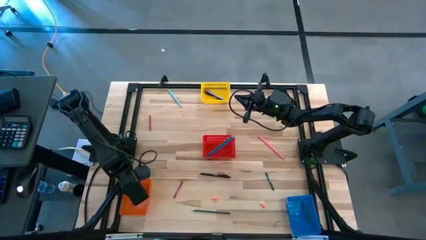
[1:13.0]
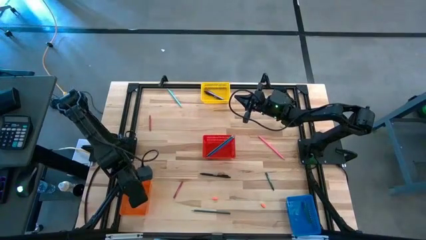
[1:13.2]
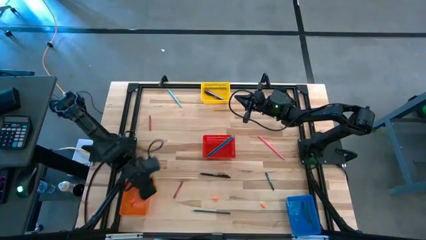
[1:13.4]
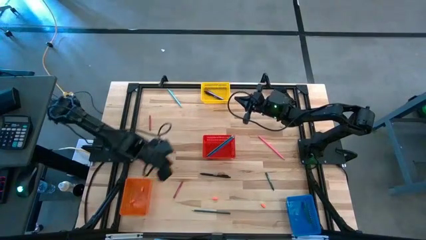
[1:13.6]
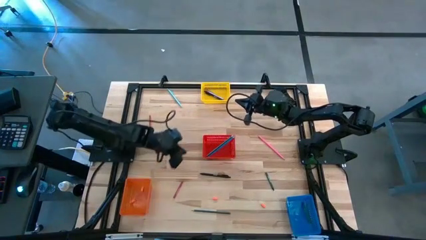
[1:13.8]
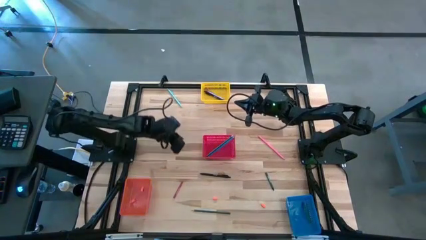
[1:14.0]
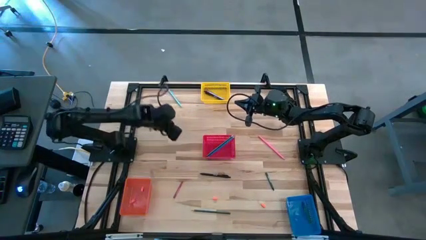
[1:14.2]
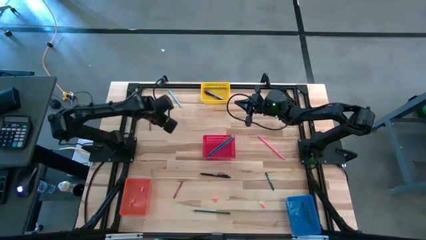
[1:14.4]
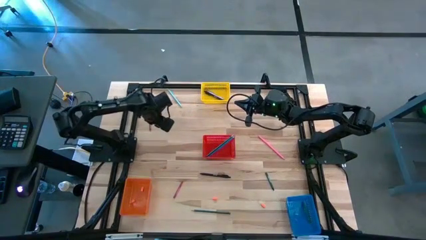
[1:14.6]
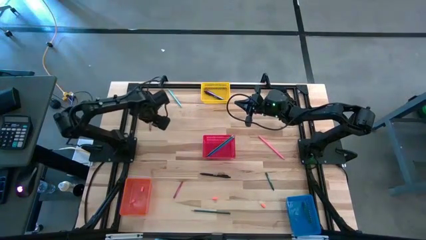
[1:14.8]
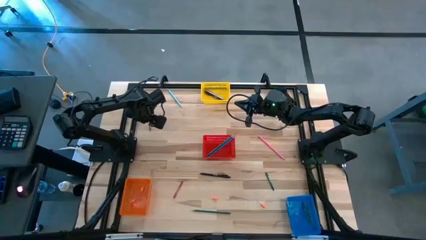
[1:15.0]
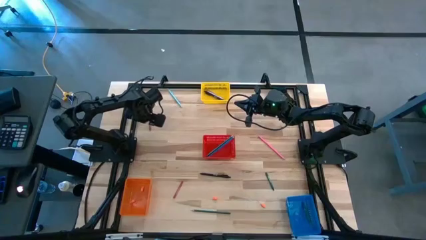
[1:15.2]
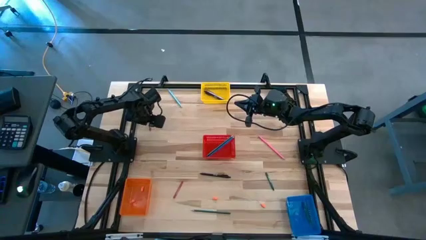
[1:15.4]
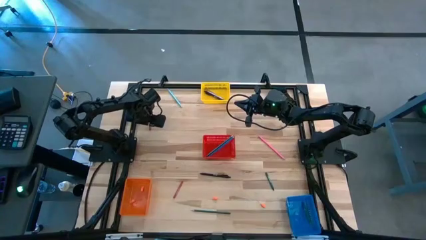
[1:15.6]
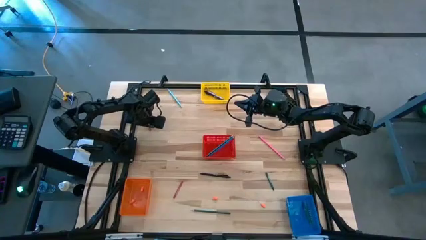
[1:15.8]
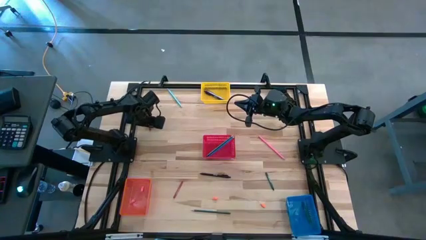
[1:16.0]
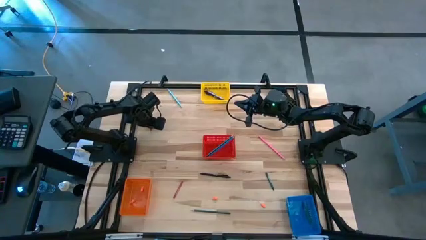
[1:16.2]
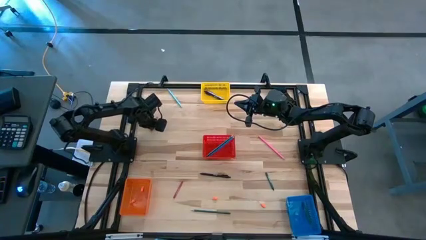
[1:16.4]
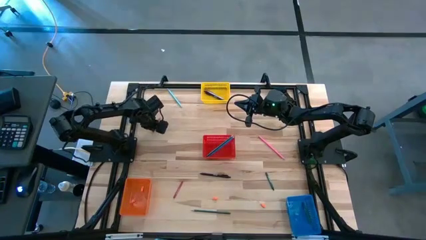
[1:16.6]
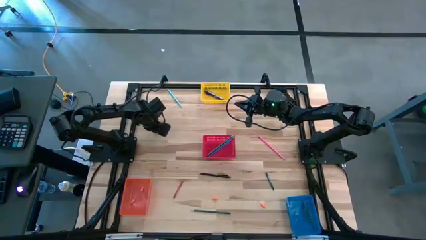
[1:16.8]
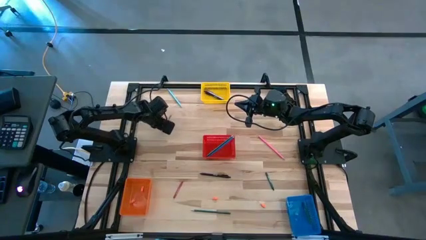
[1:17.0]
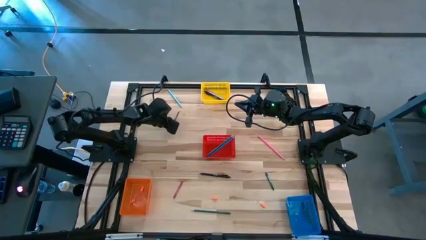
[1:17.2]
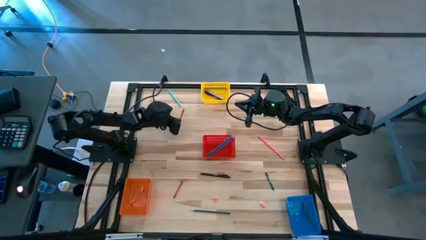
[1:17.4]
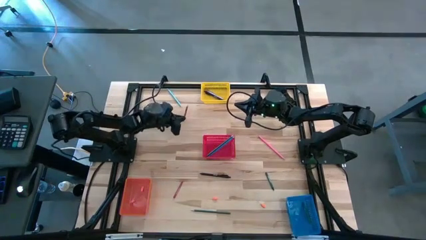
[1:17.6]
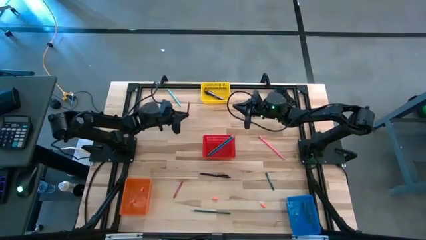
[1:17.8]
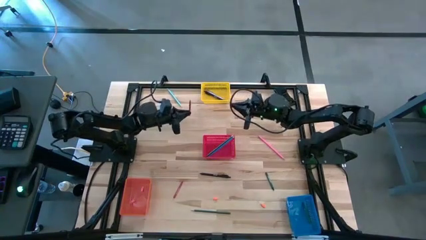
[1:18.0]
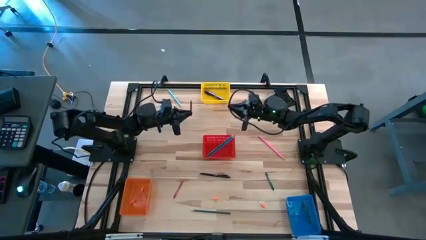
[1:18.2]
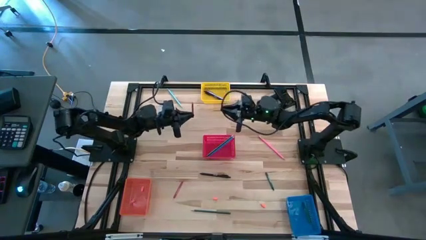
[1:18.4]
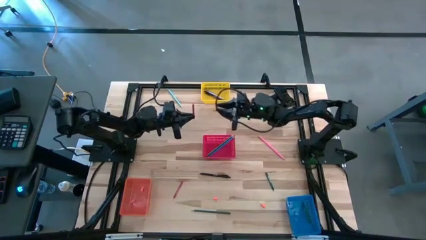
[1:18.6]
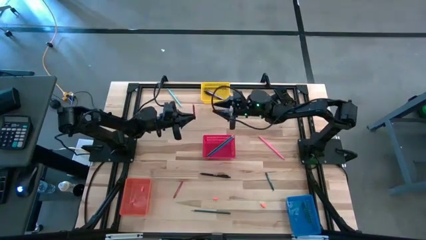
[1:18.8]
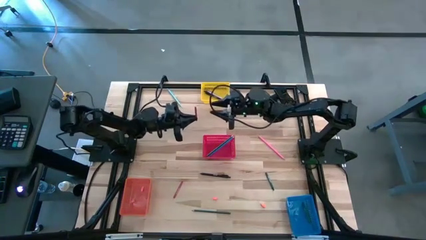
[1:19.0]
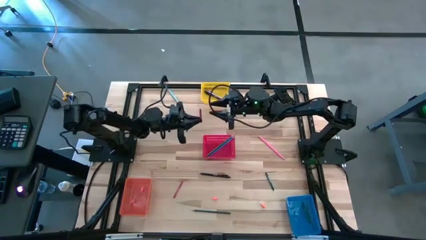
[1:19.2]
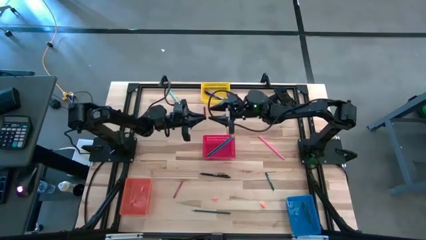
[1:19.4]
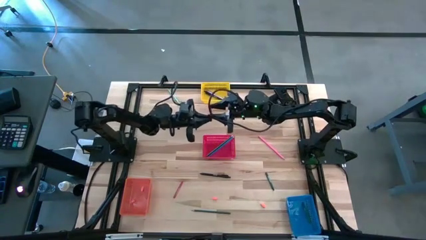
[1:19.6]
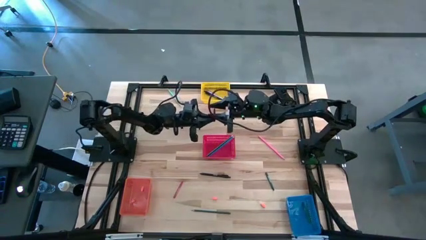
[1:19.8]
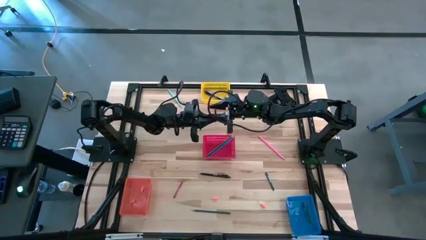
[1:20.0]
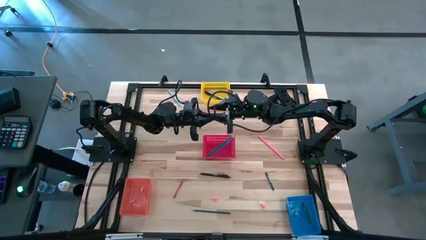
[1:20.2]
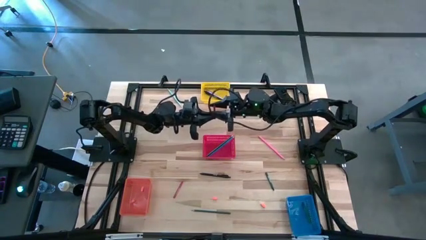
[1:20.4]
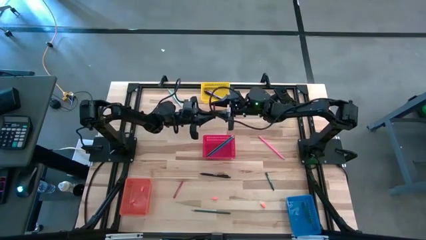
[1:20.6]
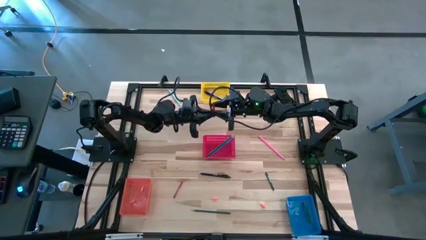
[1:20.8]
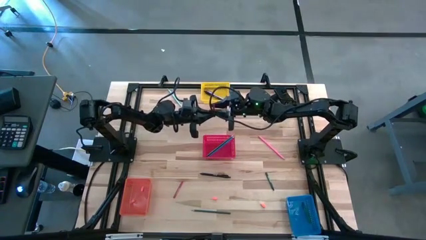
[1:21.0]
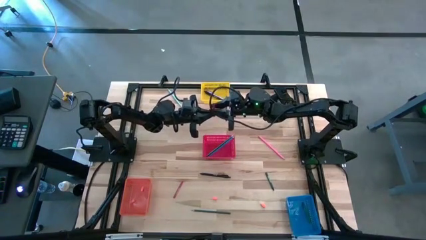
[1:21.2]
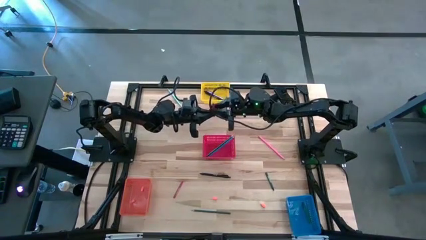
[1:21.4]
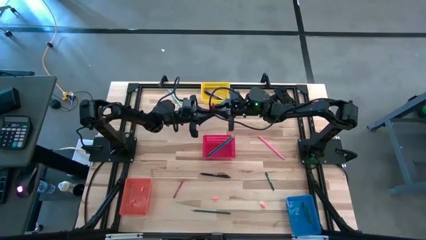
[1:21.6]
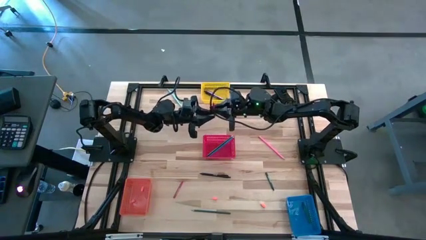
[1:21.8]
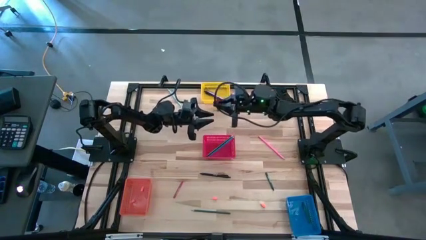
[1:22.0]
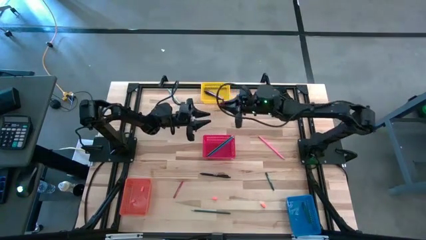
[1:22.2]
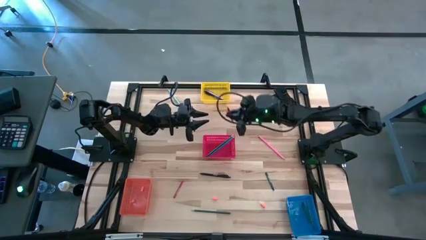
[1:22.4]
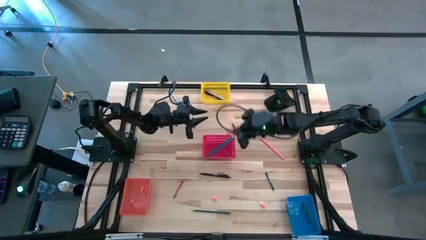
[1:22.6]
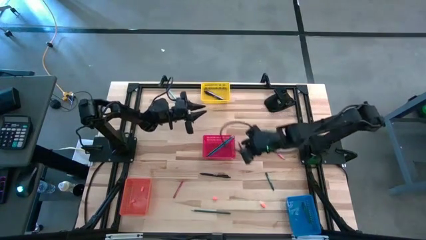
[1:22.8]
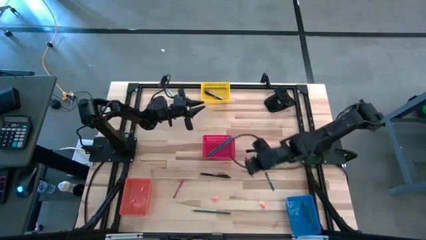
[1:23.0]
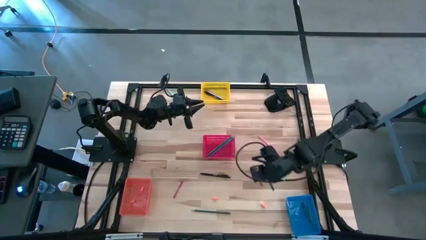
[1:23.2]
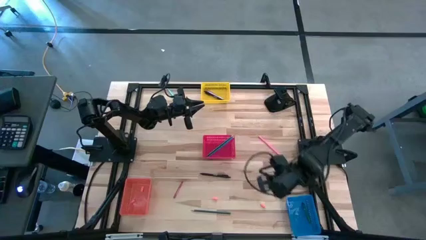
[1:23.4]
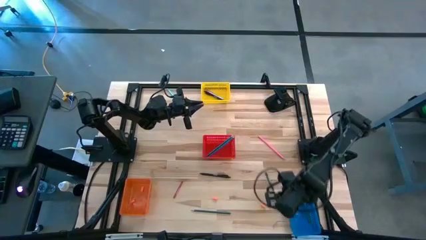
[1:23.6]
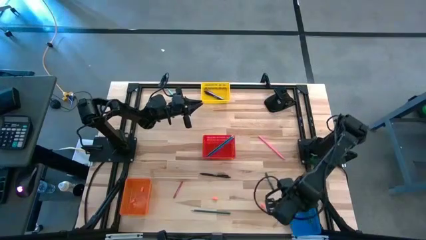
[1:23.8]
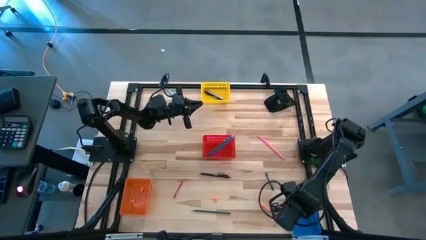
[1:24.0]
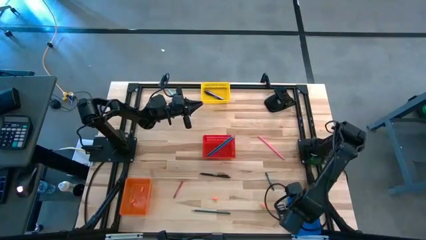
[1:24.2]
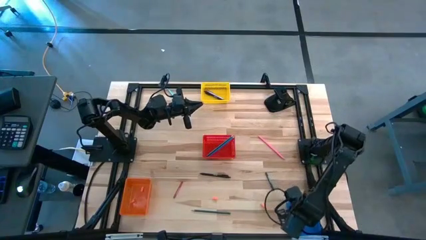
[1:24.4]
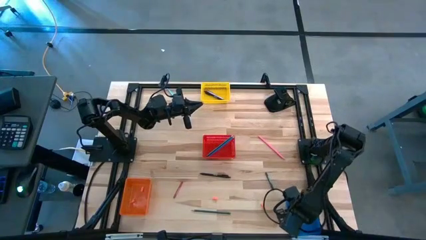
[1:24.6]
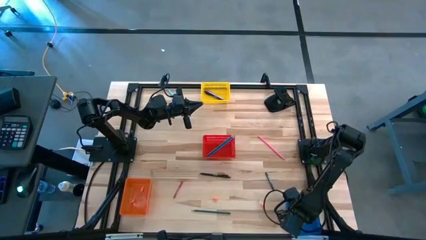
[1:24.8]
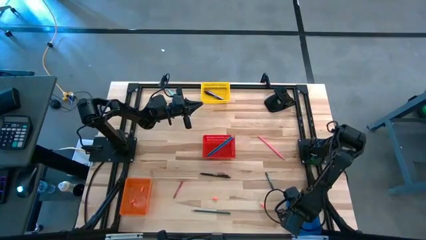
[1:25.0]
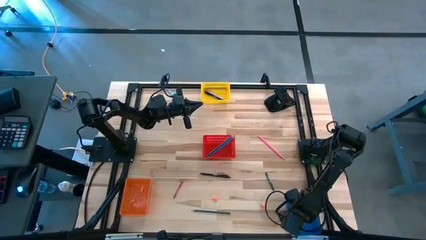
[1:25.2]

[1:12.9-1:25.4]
Task: Sort crayons/erasers/pens/pencils in bins
Put the red crayon into the blue bin

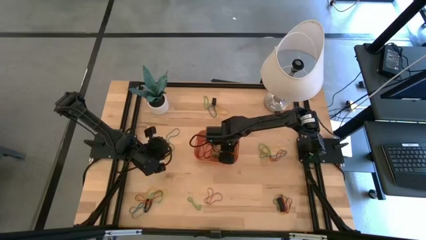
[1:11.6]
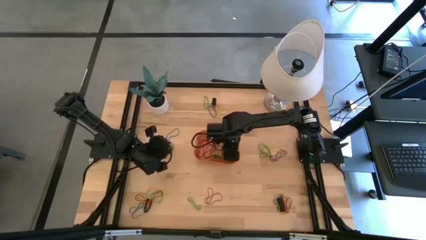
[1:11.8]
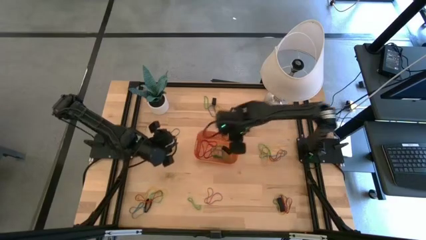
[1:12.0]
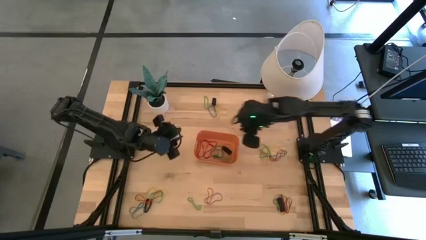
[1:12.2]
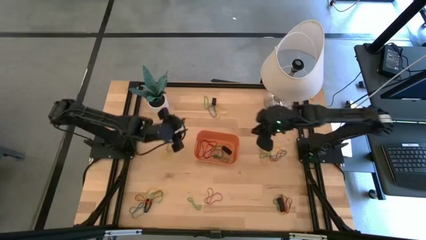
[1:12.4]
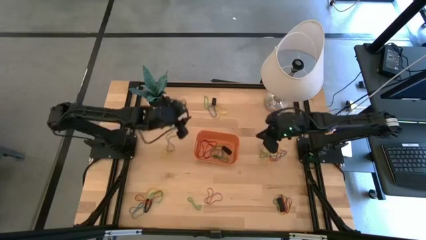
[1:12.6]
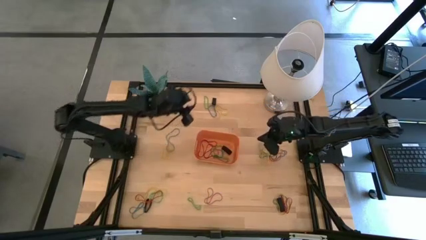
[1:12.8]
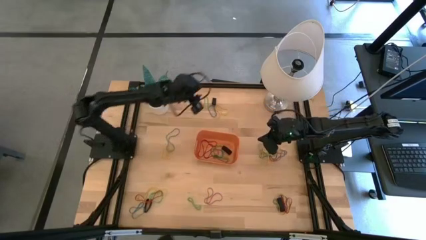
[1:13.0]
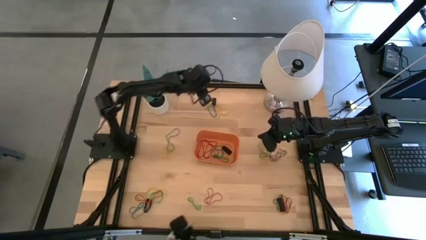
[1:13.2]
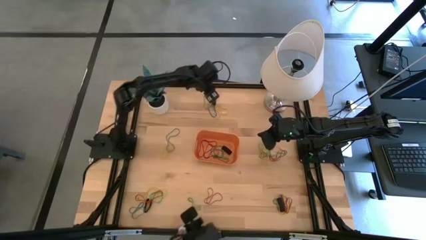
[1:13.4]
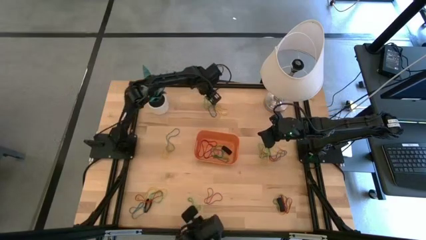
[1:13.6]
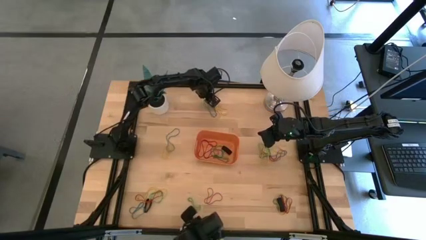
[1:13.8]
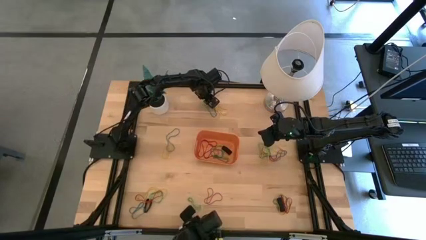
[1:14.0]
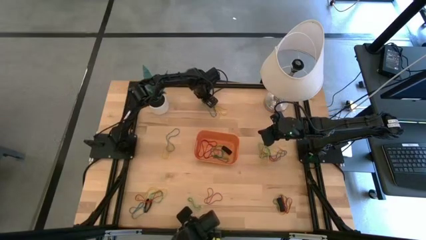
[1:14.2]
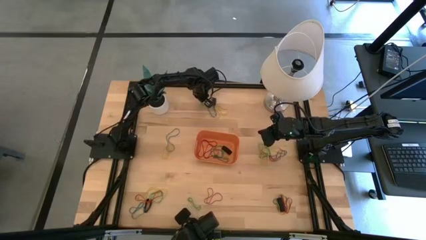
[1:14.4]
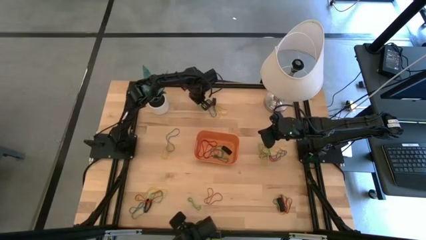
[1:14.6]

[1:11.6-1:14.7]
Task: Pick and place rubber bands into bin
Put the green rubber band into the orange bin
